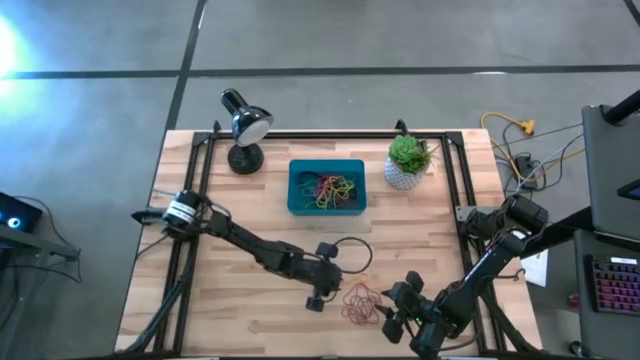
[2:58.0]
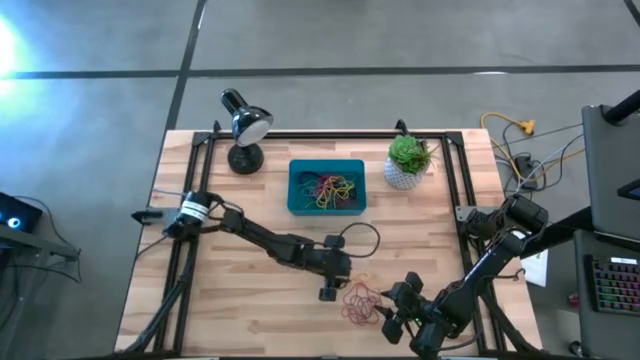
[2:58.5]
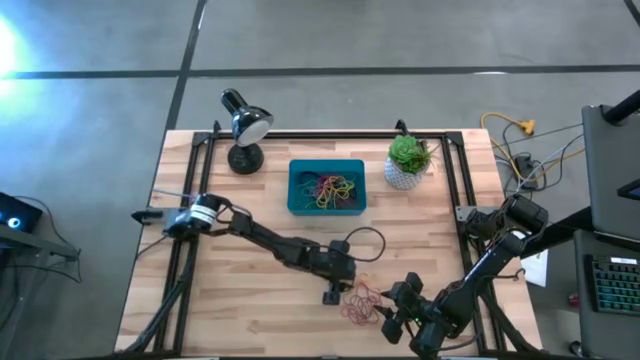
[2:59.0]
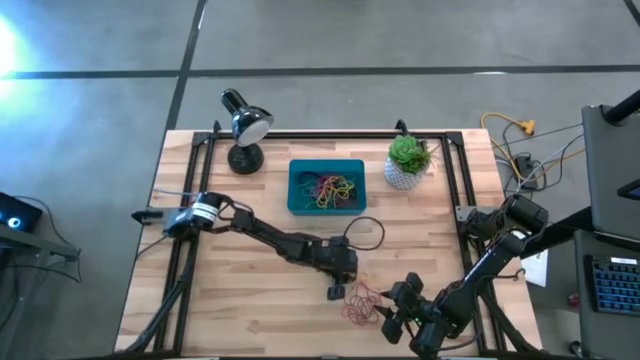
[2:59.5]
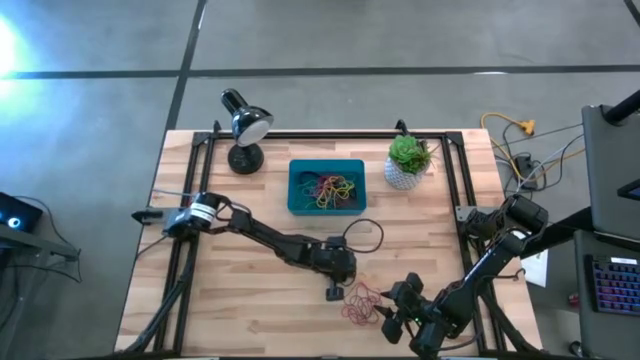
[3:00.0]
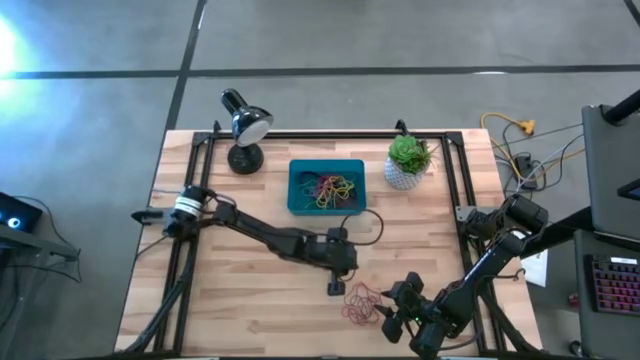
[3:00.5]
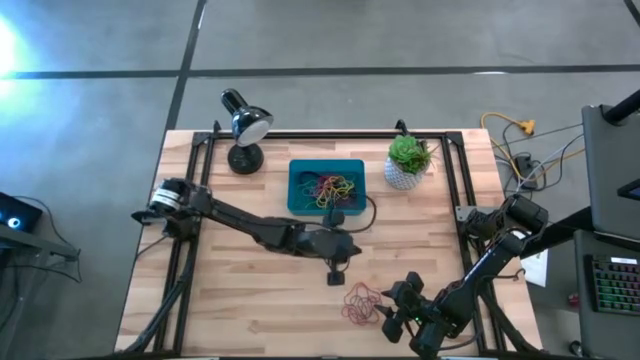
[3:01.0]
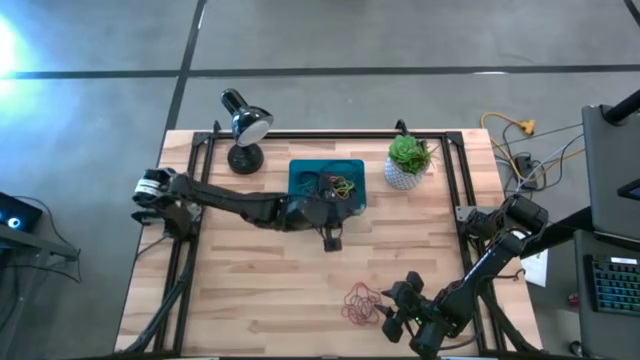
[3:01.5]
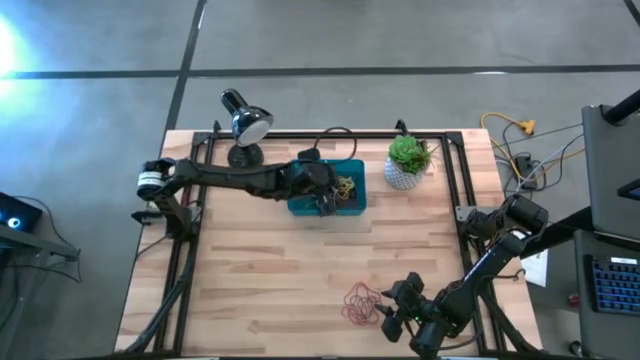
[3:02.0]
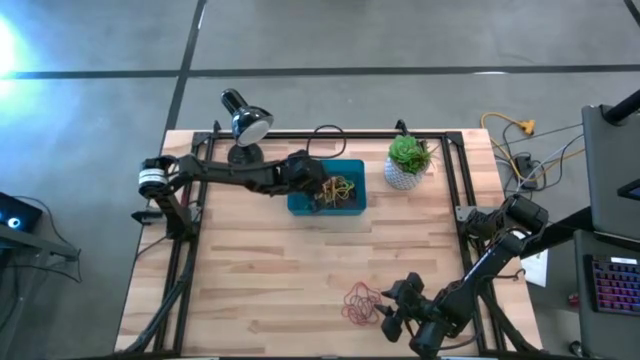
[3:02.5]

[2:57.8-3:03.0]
Task: Pick and place rubber bands into bin
Put the yellow rubber band into the dark blue bin

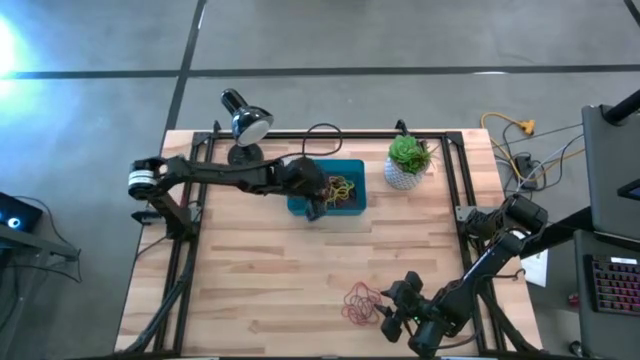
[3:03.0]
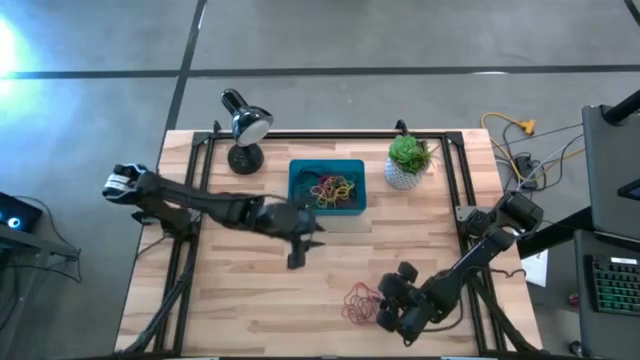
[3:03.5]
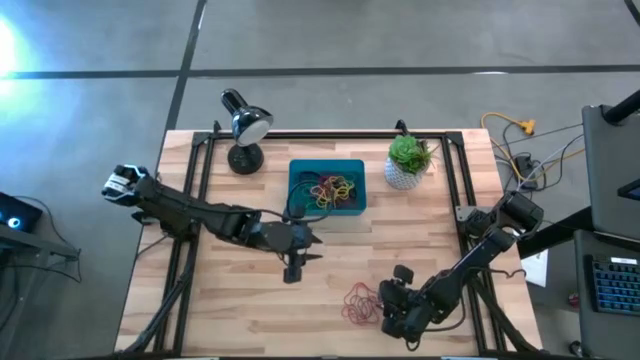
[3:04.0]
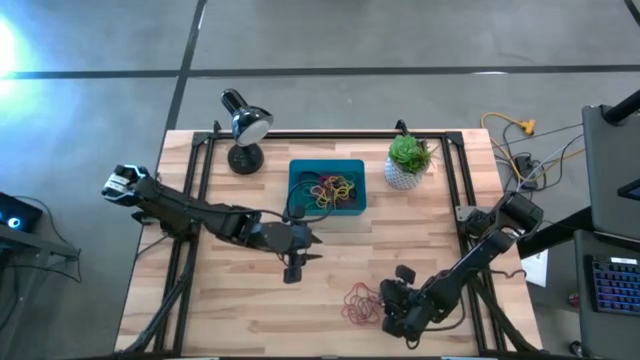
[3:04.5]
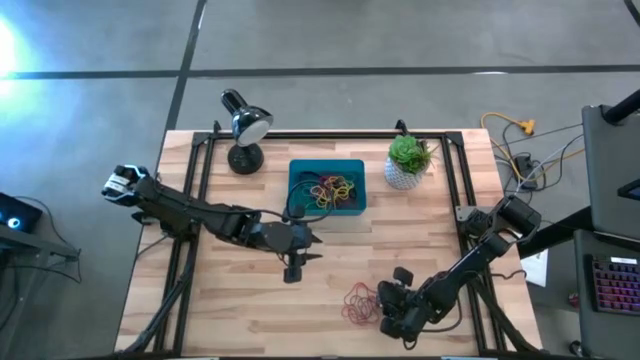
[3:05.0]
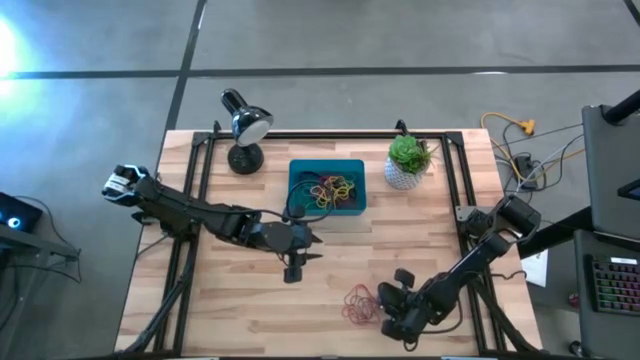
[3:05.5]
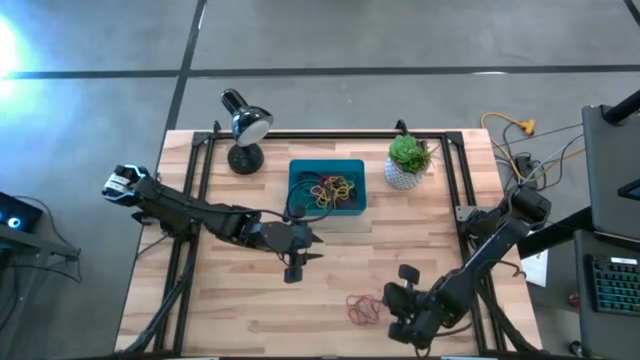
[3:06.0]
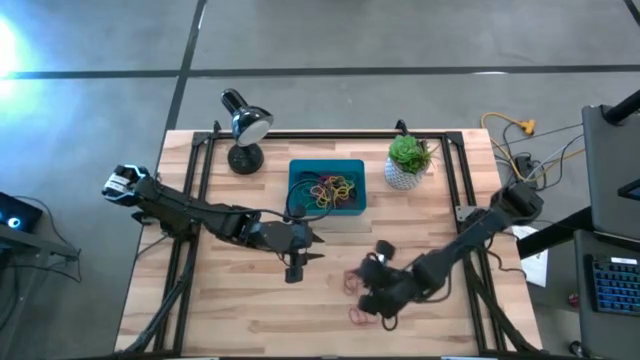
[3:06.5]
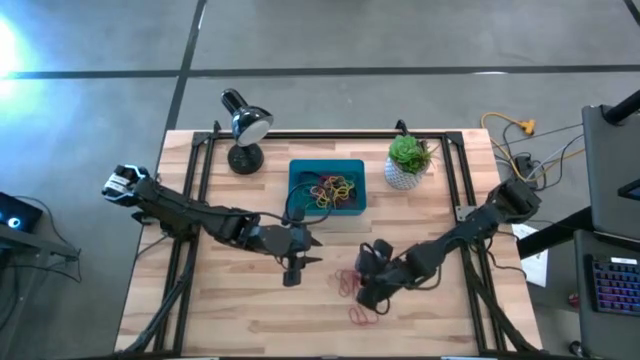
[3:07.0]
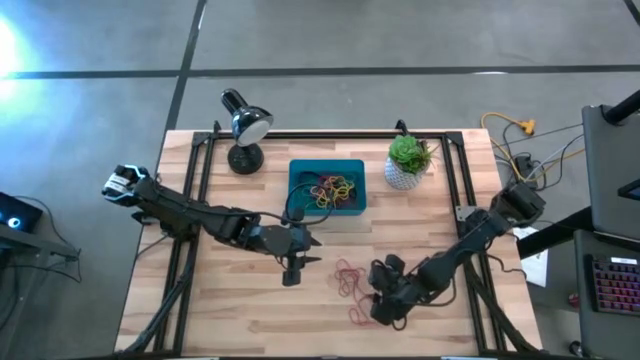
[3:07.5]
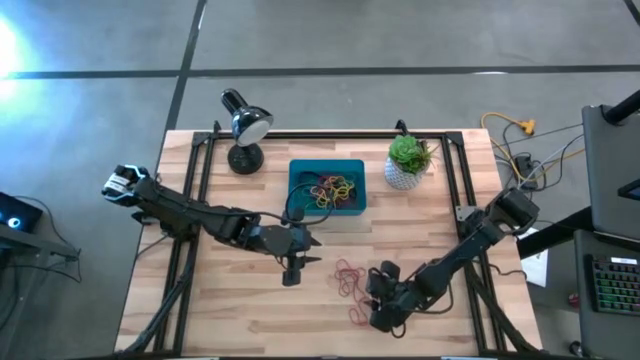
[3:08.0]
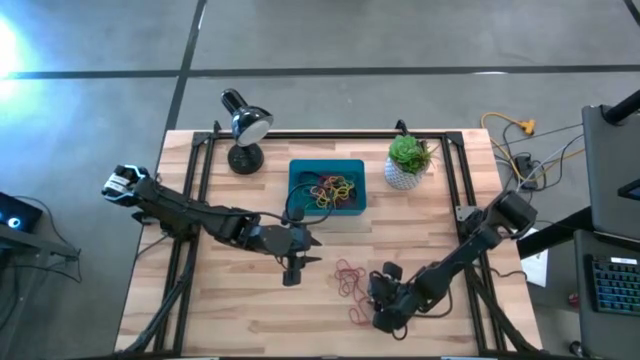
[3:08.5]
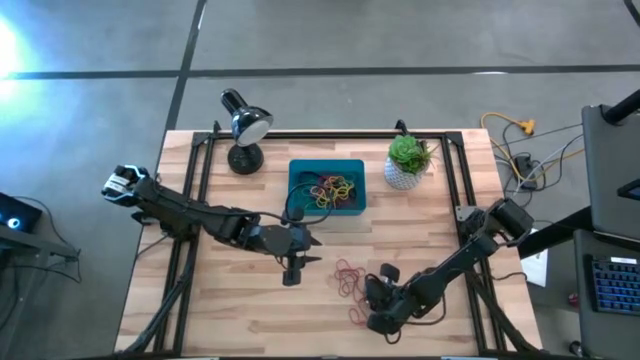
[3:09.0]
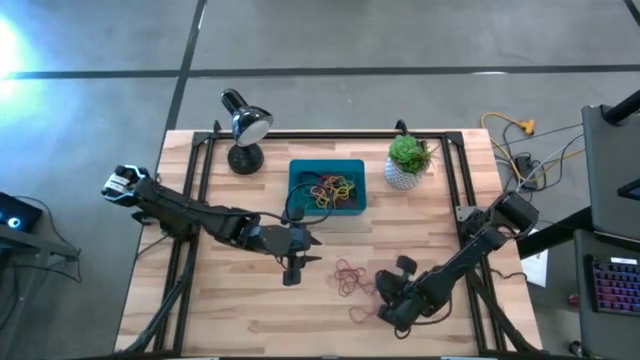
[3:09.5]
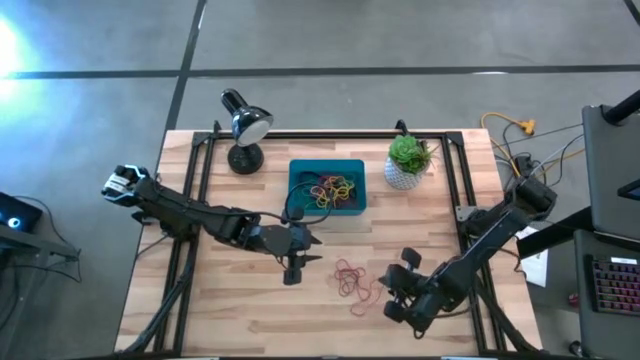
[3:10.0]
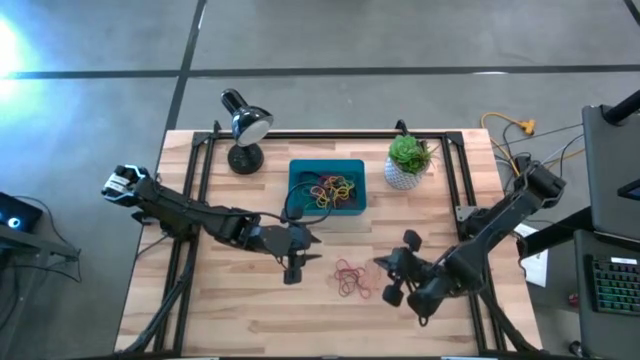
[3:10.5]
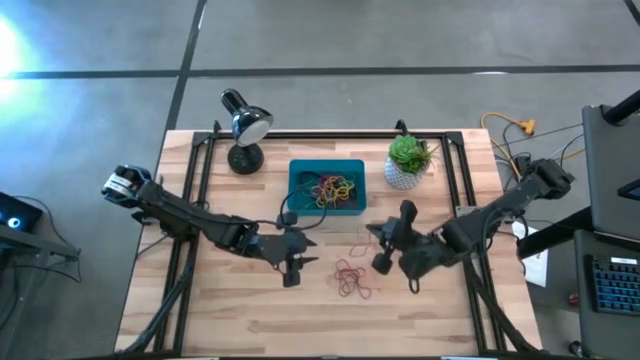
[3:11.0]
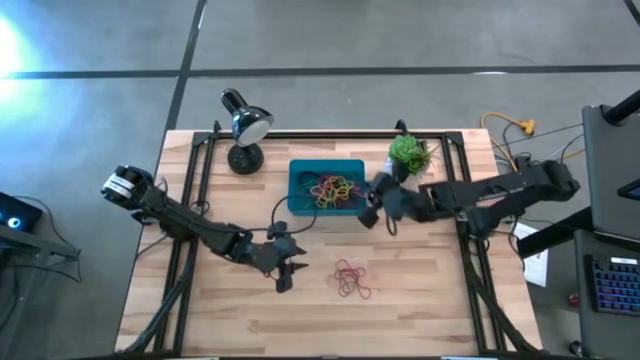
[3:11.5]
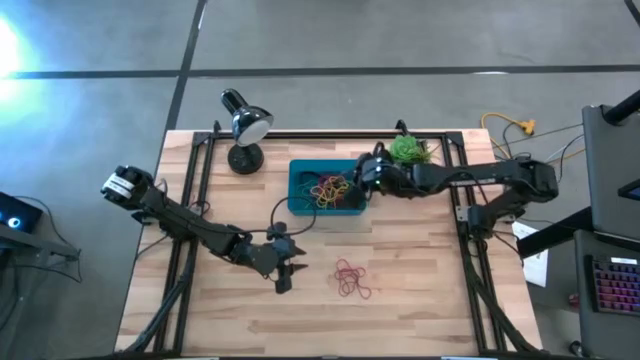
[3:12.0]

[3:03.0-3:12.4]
Put the red rubber band into the dark blue bin

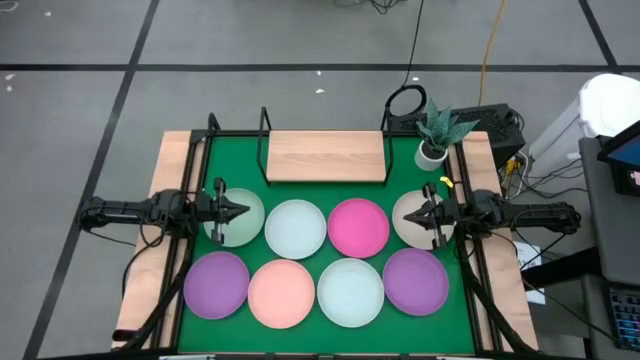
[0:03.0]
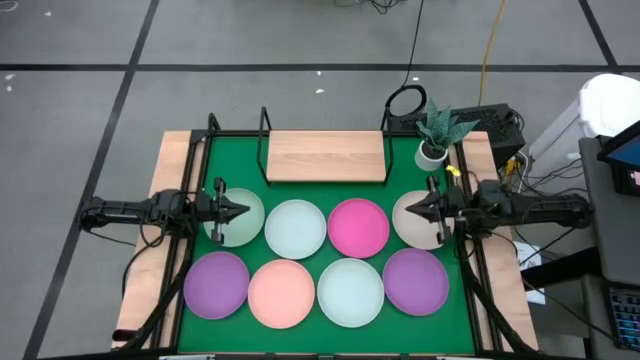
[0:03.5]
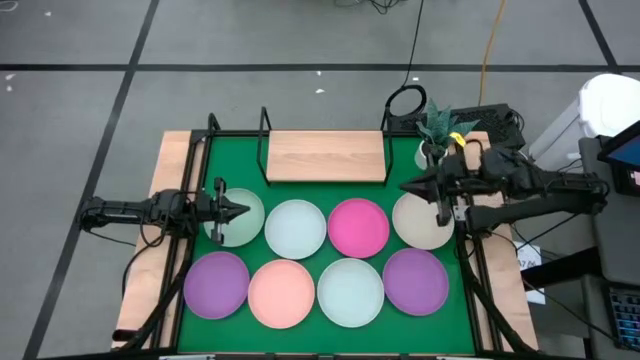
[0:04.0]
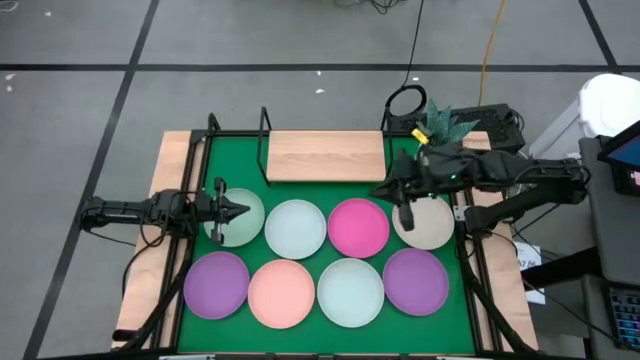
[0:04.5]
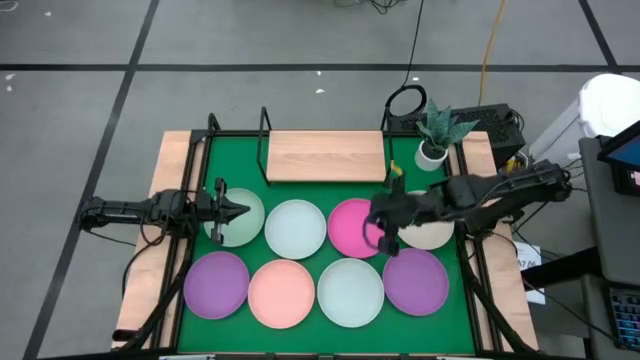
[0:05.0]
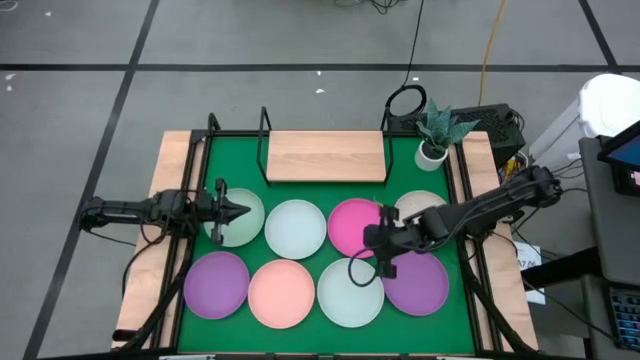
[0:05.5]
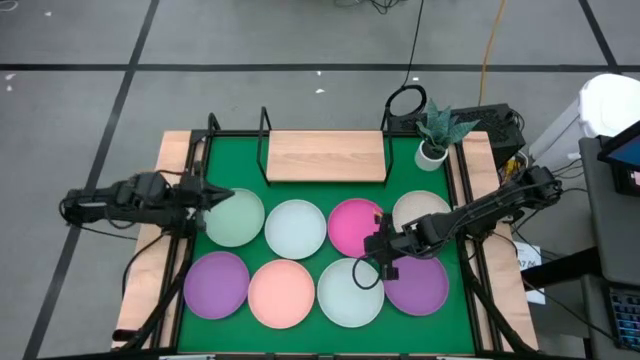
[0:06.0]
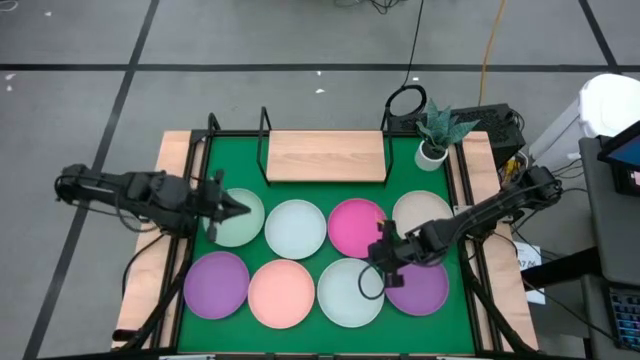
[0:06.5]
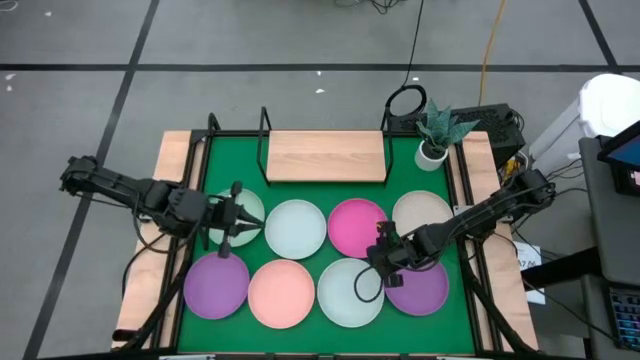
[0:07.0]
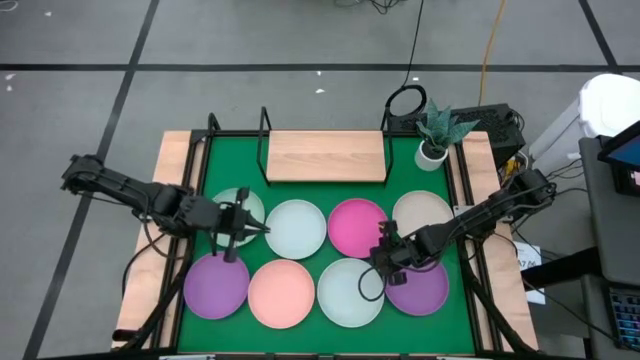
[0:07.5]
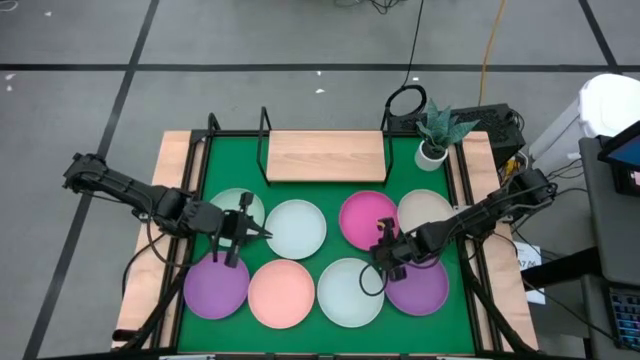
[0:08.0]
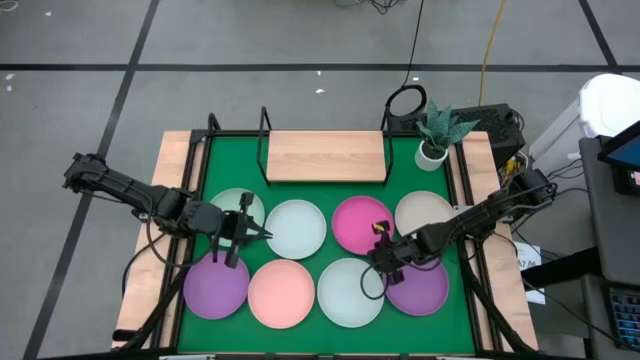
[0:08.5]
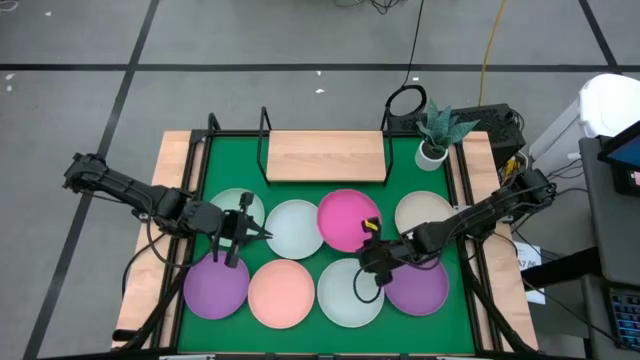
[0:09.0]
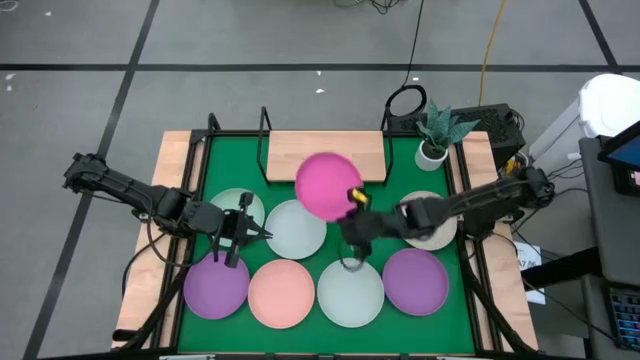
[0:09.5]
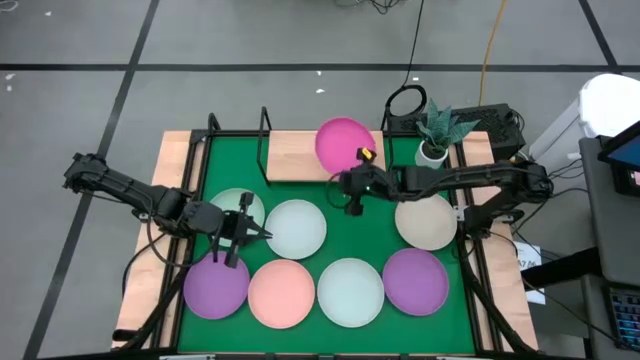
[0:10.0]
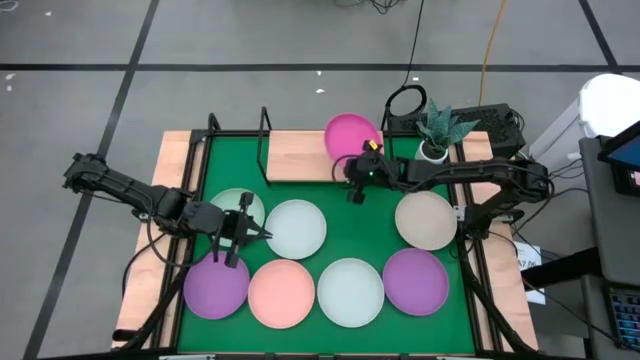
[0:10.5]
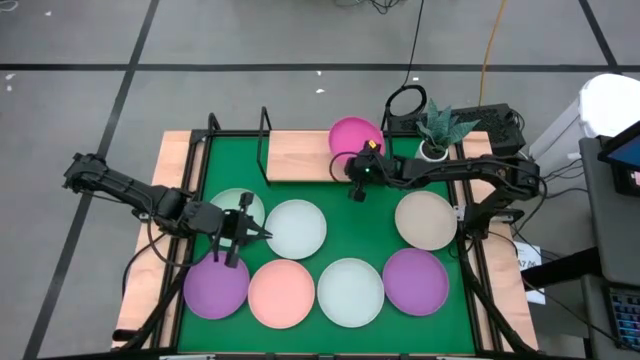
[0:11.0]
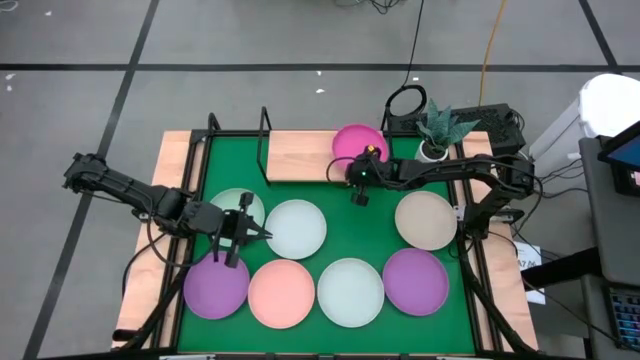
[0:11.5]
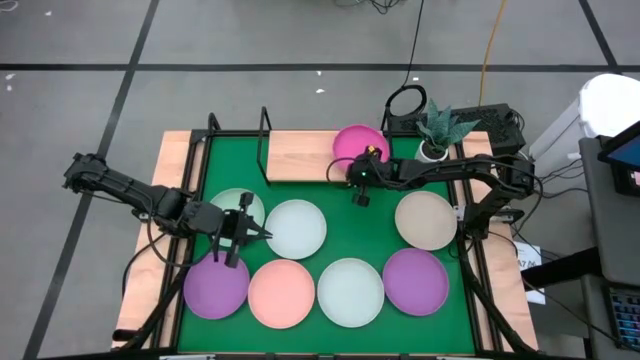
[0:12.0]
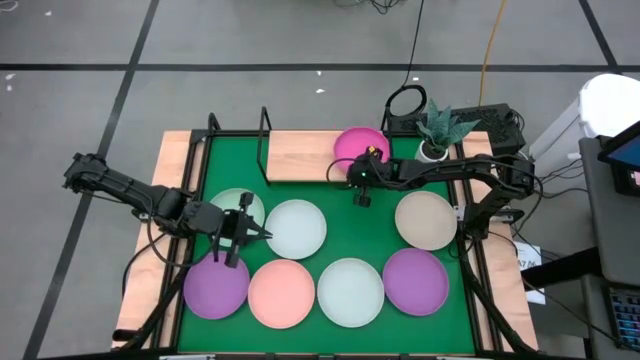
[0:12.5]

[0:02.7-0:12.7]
Task: Place and stack plates onto a shelf
Put the pink plate on the shelf
